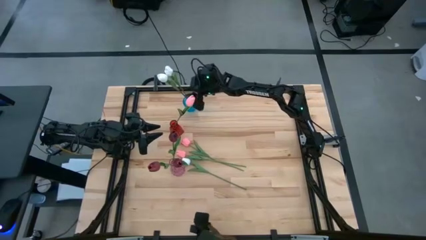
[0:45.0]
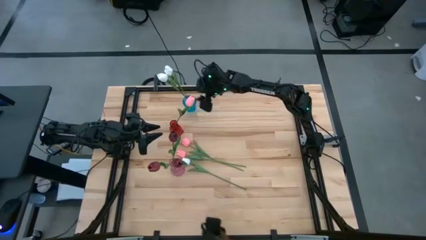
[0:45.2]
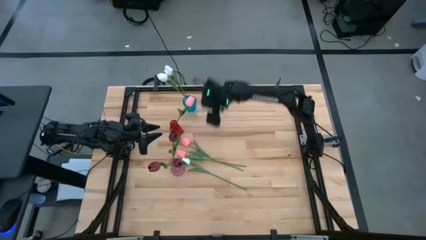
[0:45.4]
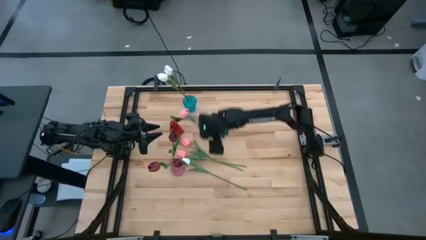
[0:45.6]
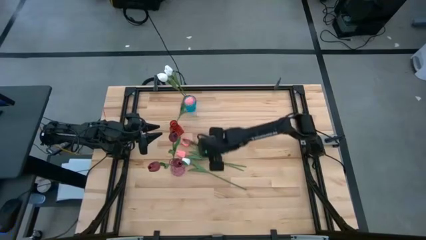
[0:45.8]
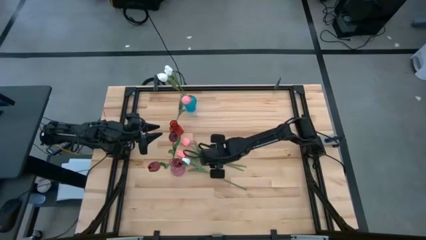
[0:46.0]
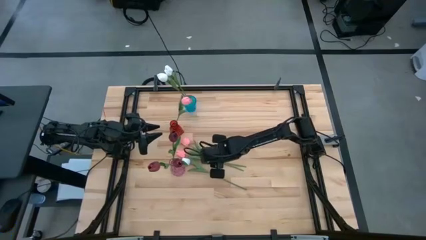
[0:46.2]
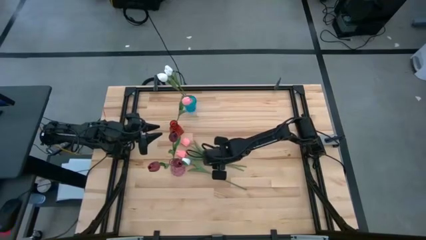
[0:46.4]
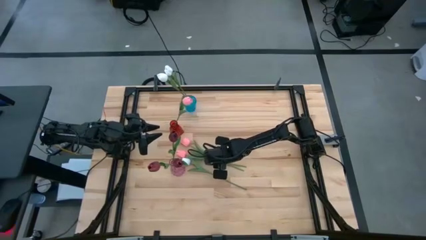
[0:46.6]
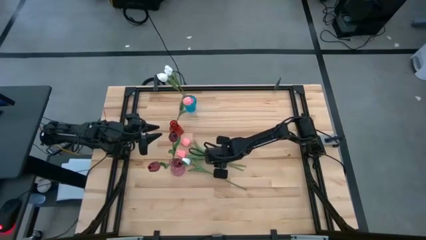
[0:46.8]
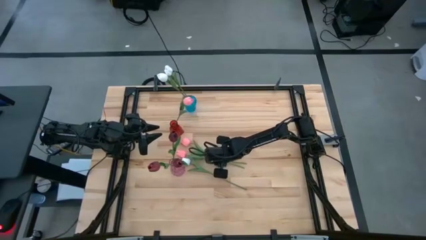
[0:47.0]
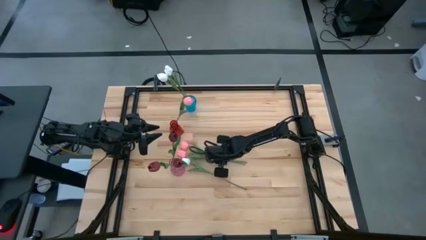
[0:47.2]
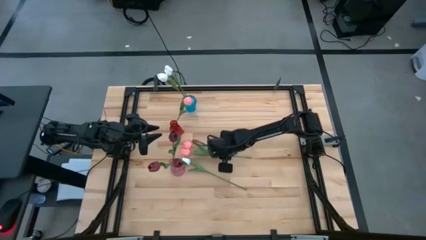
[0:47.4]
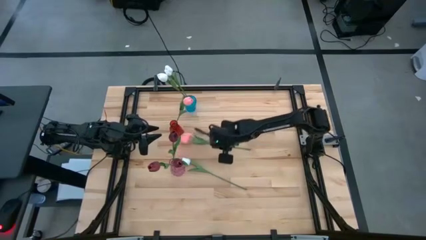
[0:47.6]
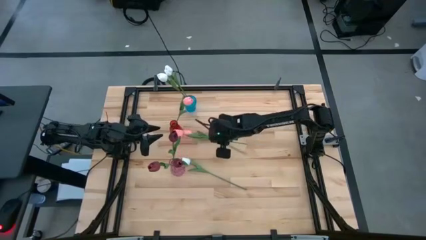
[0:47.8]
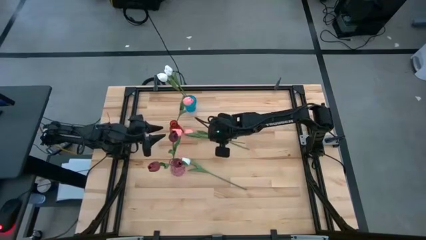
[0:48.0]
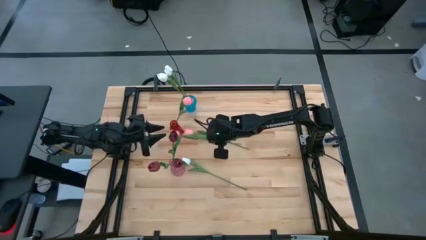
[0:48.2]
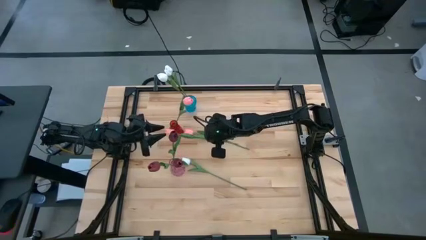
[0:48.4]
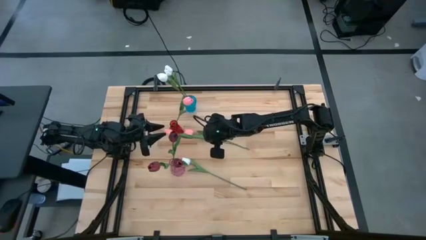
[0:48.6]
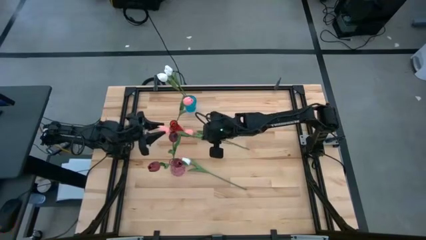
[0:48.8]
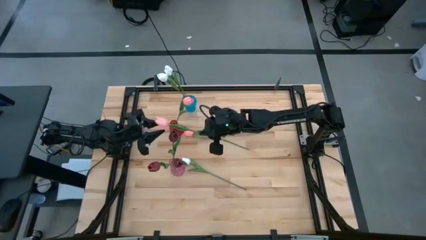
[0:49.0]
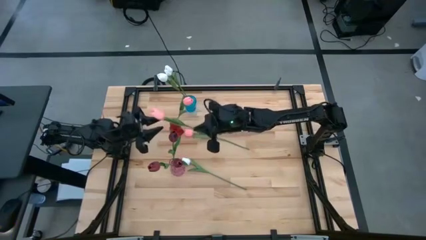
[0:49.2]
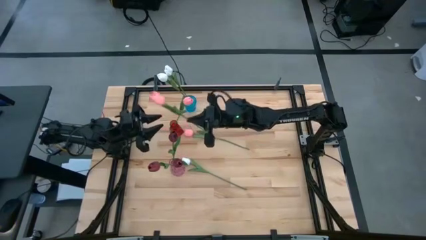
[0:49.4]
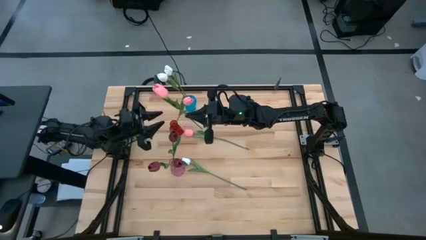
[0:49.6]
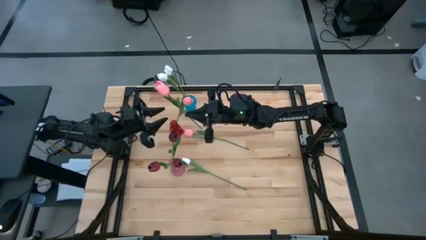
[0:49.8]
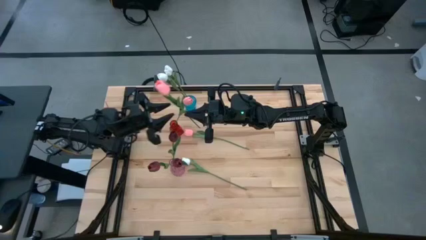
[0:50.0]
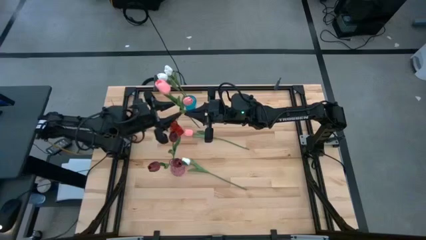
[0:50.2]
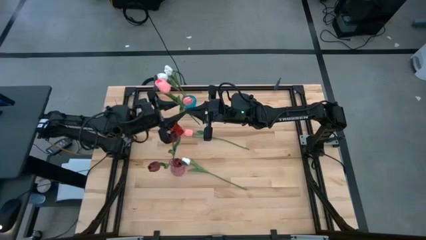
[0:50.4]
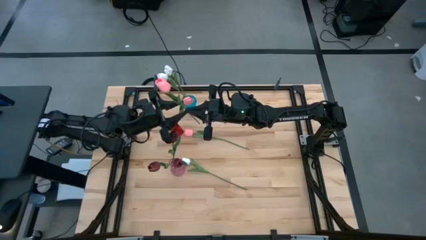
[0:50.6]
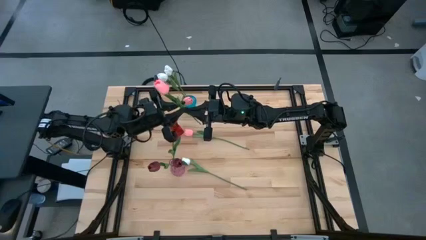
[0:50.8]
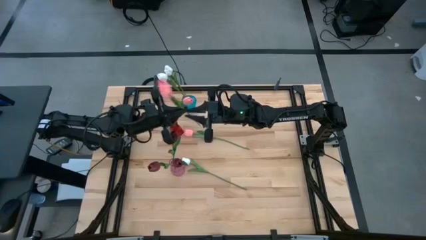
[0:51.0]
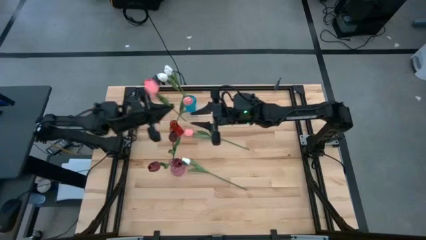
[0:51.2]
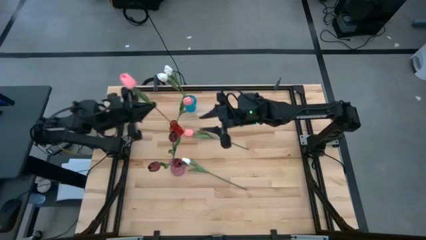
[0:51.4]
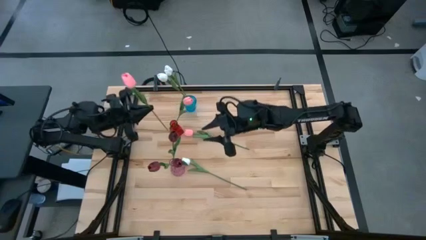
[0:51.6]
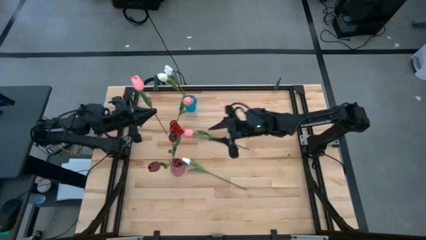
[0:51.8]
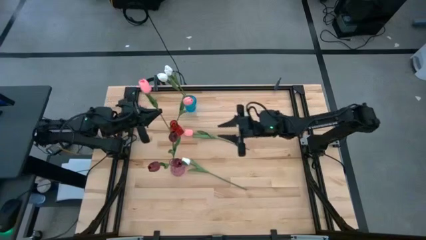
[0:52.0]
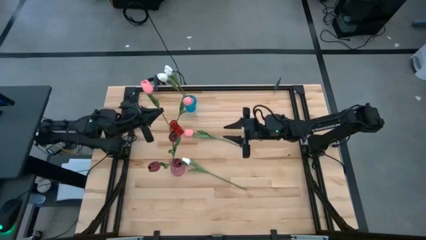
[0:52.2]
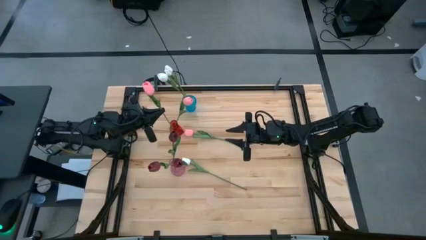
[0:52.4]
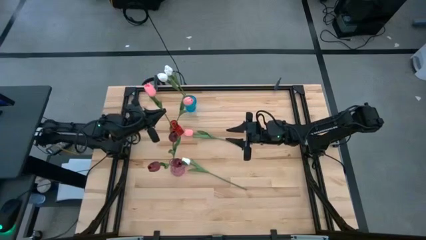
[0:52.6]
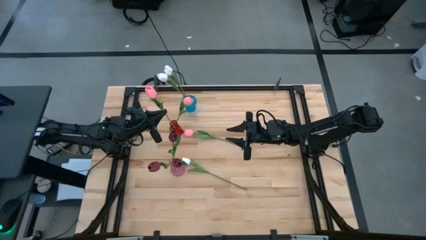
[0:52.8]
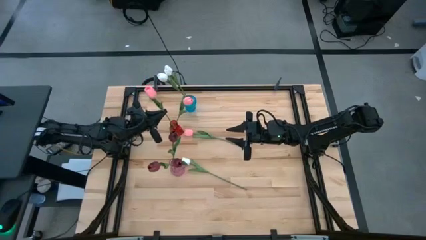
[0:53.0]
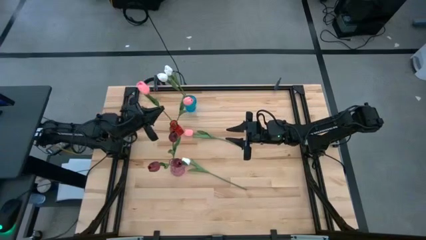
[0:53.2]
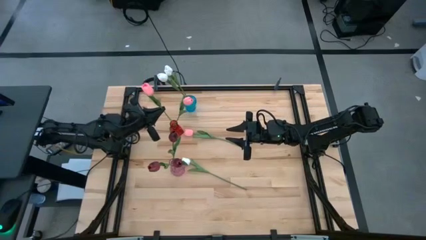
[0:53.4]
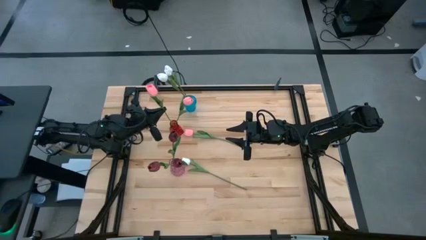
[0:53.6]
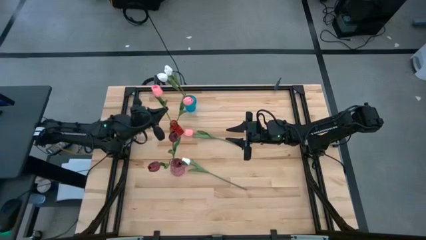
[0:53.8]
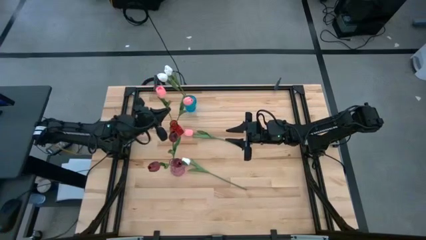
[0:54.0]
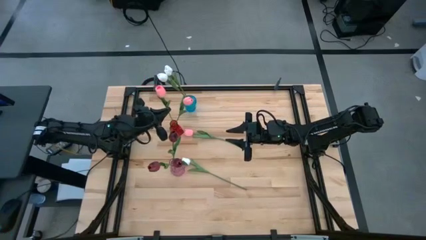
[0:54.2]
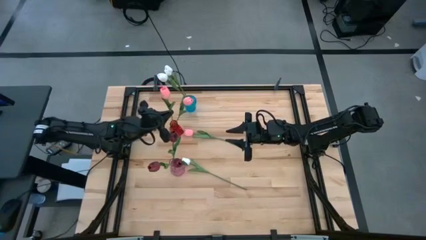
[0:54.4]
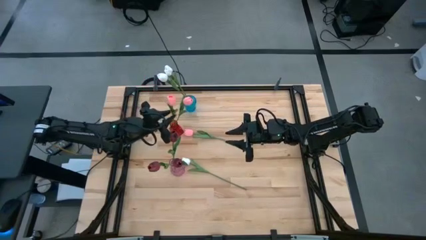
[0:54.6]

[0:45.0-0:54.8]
Task: Sort flowers into vase by color
Put the pink tulip into the red vase

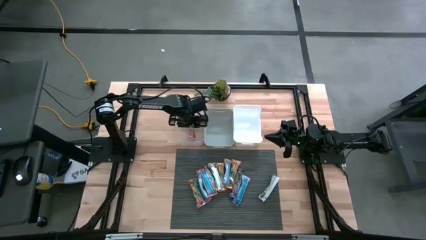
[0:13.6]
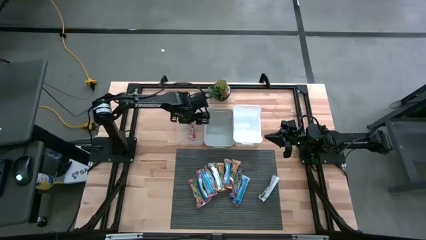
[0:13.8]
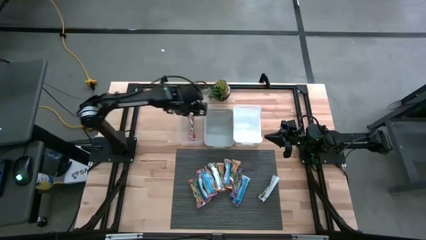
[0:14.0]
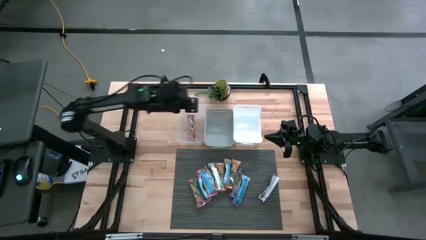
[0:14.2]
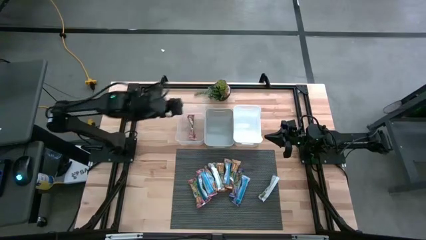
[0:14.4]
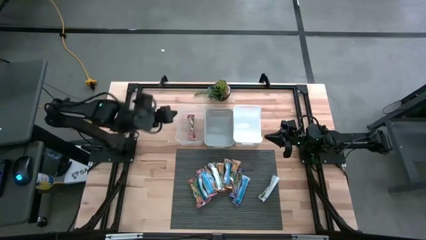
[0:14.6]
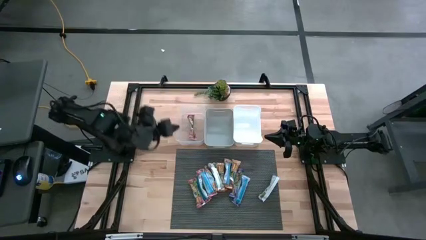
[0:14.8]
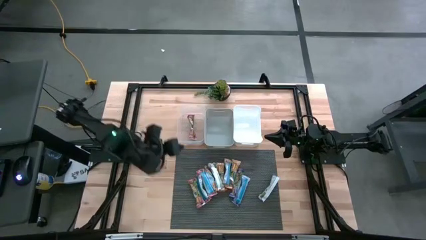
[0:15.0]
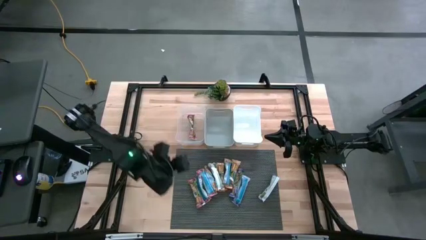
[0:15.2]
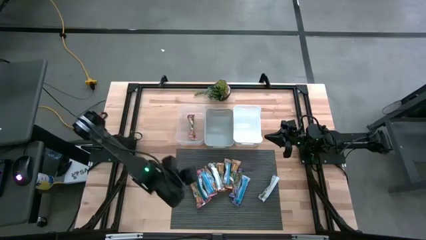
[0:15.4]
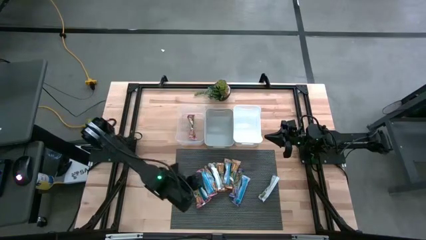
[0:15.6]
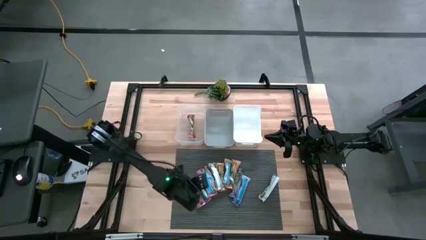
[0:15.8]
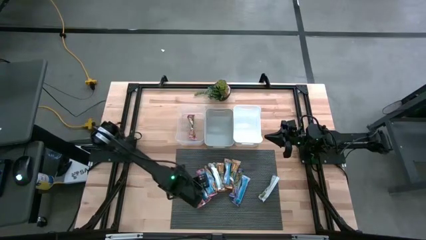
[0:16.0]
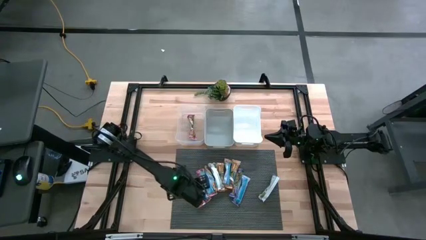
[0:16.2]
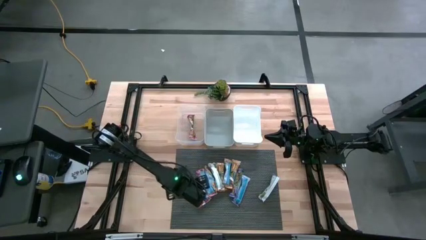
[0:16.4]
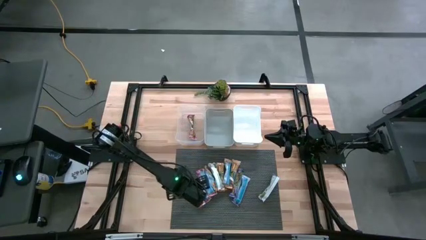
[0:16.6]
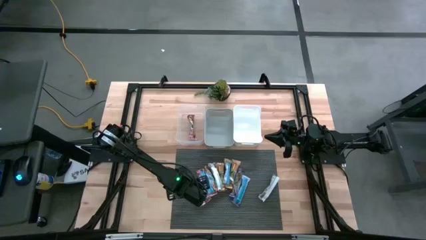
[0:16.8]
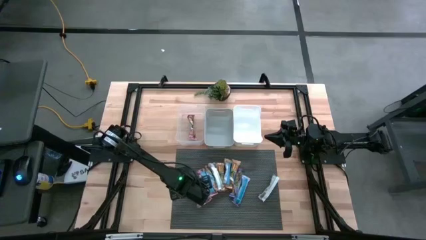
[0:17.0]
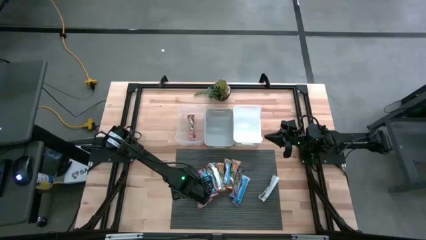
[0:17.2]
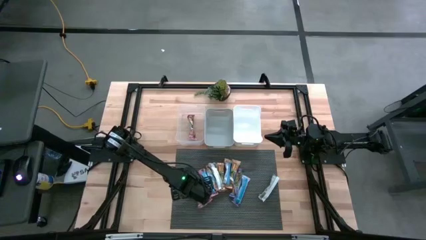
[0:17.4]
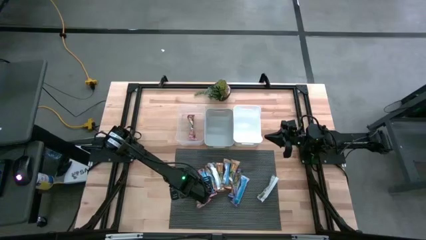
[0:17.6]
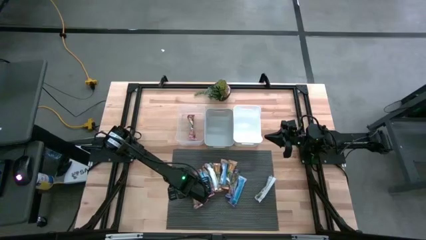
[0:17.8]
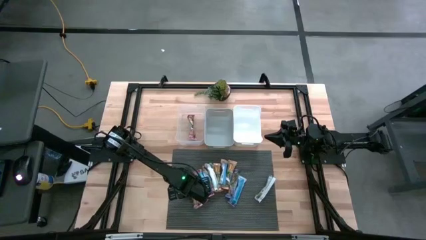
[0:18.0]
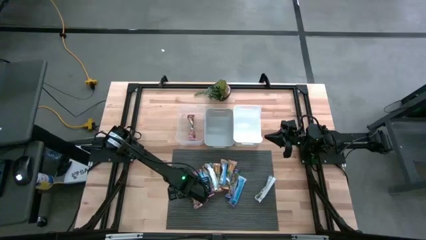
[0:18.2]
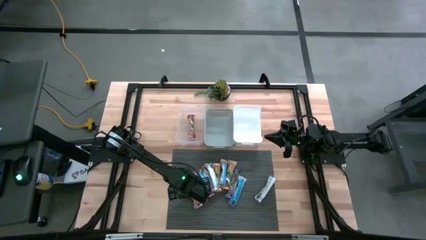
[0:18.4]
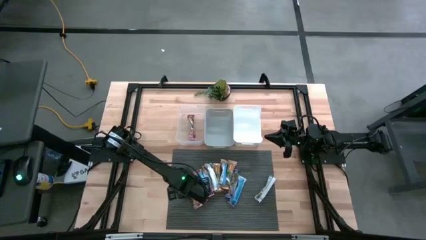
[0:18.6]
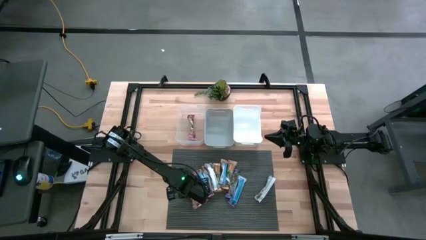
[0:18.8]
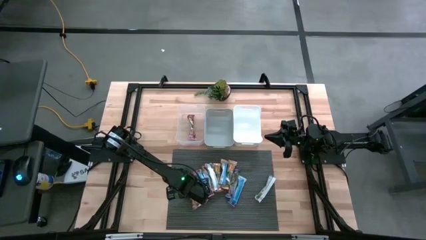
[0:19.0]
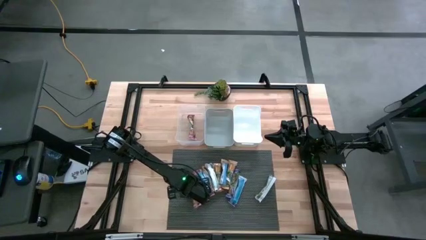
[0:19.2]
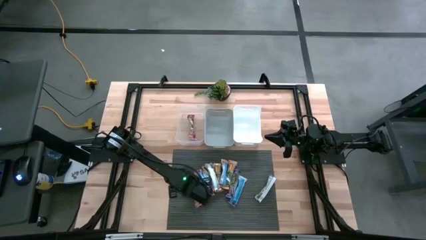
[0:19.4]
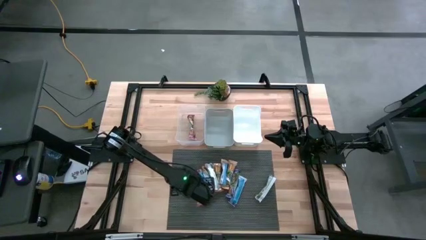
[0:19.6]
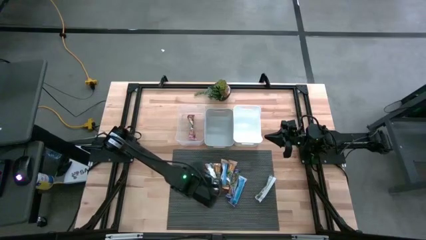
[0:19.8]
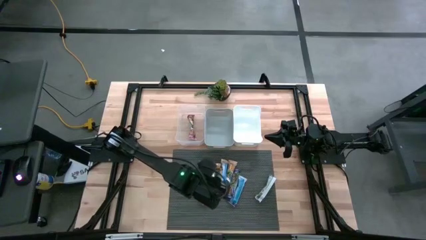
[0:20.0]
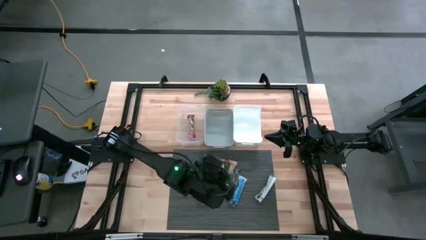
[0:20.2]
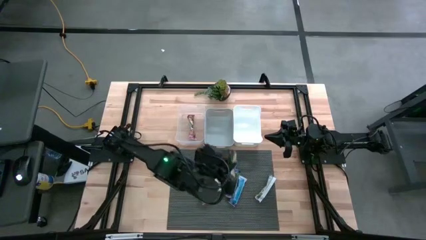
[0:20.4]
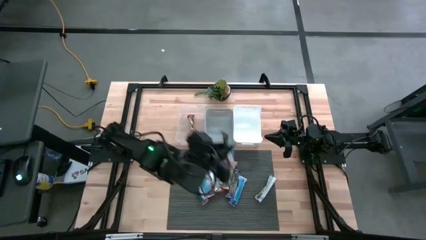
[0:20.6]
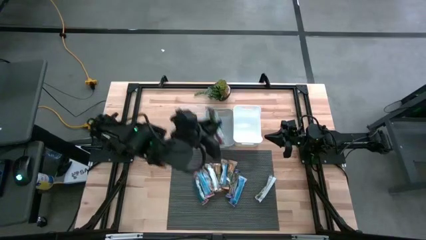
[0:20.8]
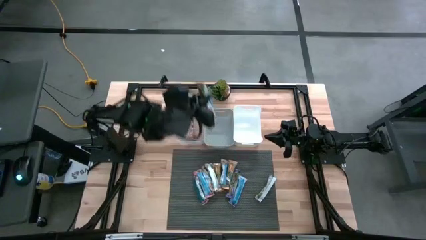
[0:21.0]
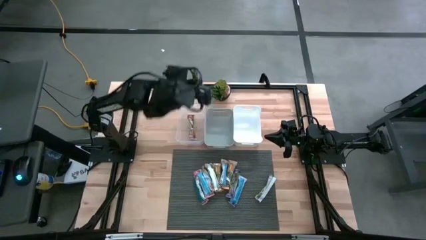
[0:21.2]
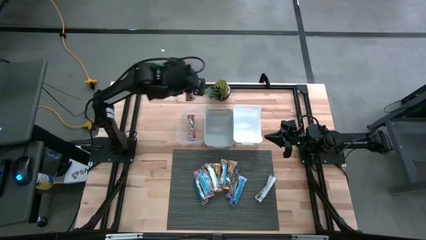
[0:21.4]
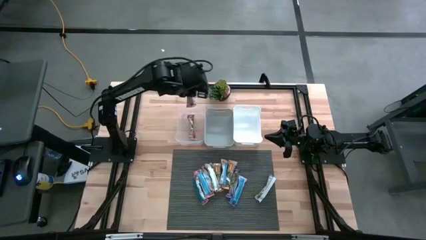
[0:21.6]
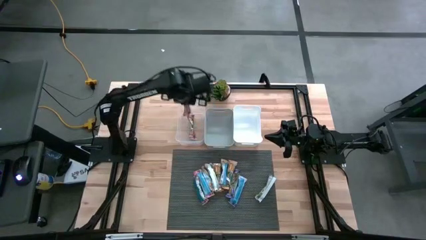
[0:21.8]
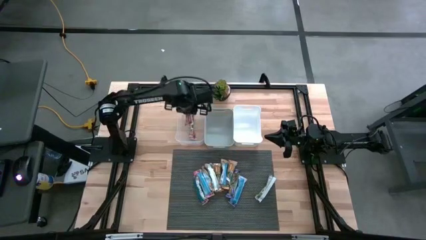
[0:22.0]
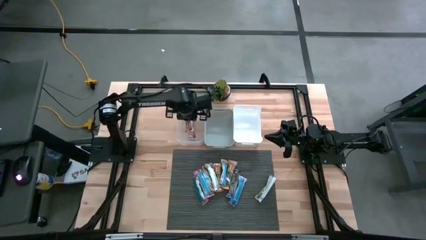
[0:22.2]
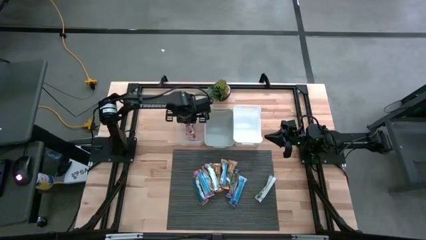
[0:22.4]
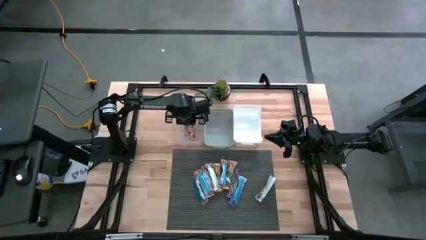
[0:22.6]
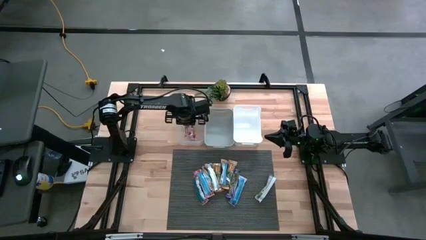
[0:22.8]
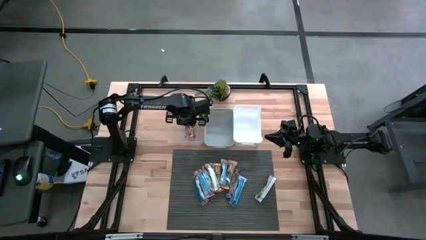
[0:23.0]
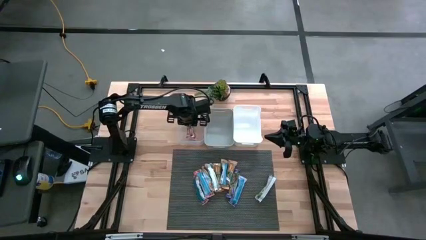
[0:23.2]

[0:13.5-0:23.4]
Task: Pick and place Granola Bars by type
Put the red granola bar into the transparent bin
